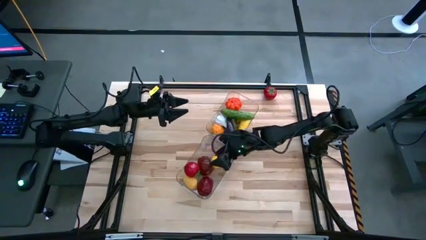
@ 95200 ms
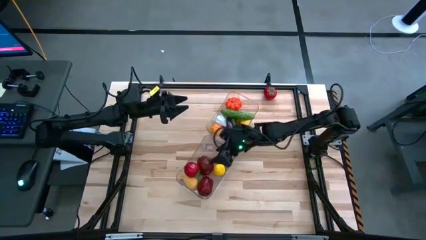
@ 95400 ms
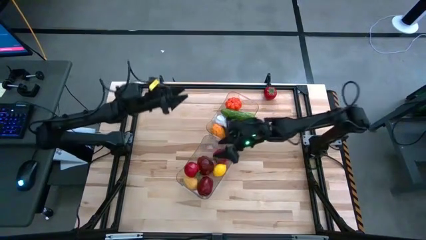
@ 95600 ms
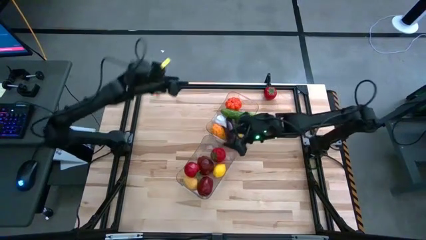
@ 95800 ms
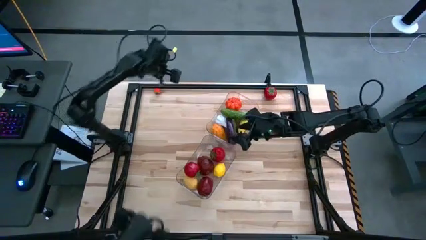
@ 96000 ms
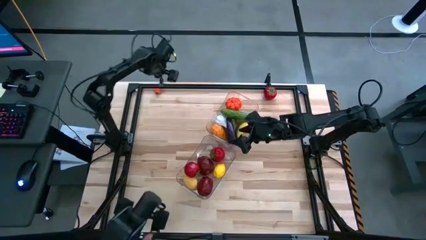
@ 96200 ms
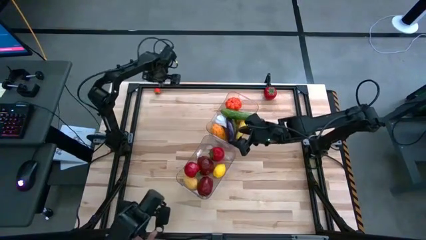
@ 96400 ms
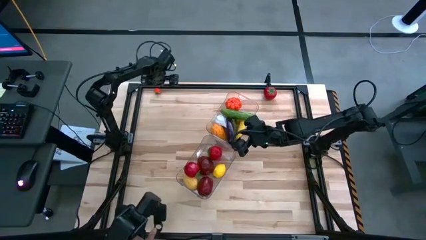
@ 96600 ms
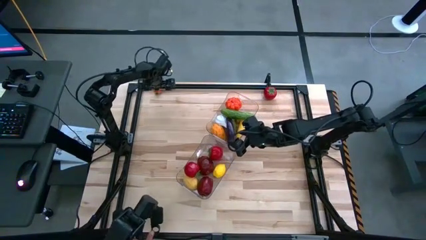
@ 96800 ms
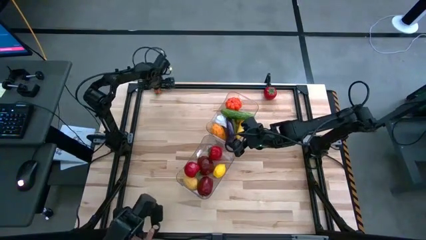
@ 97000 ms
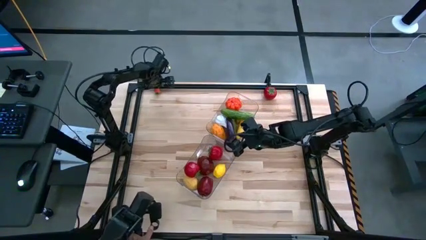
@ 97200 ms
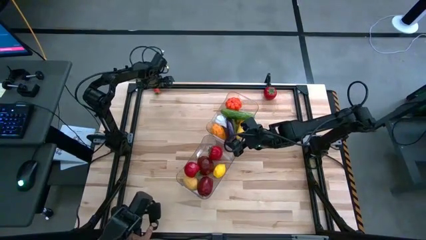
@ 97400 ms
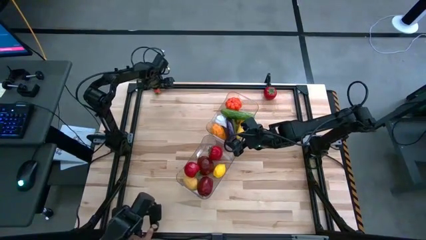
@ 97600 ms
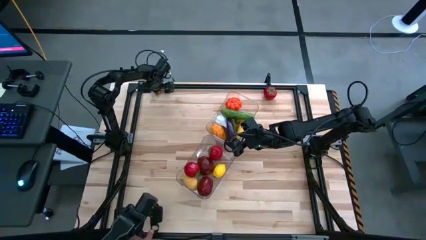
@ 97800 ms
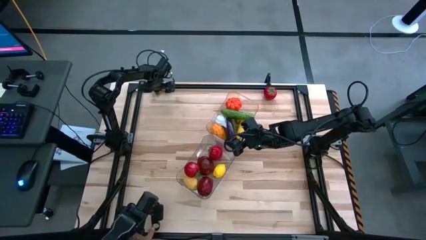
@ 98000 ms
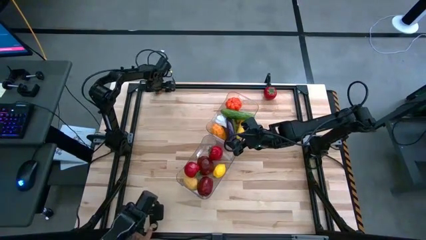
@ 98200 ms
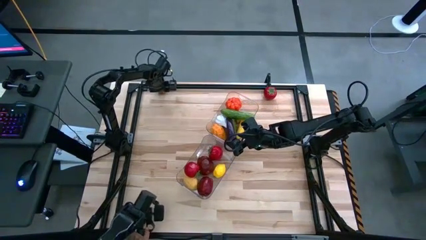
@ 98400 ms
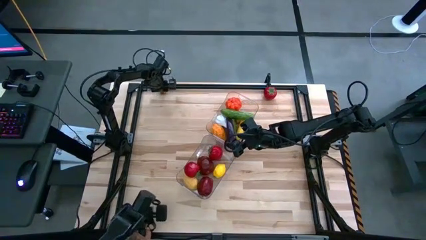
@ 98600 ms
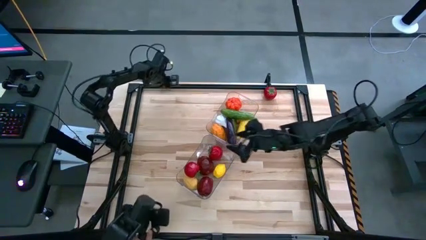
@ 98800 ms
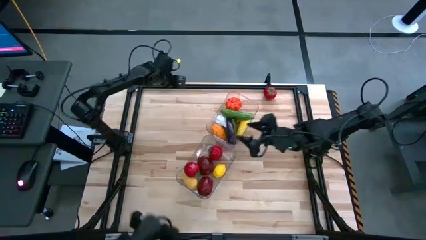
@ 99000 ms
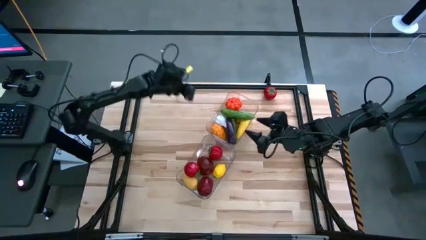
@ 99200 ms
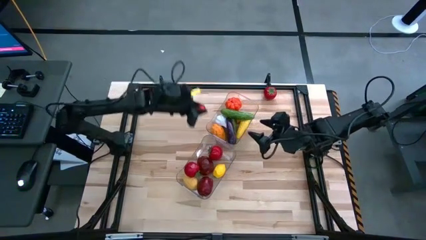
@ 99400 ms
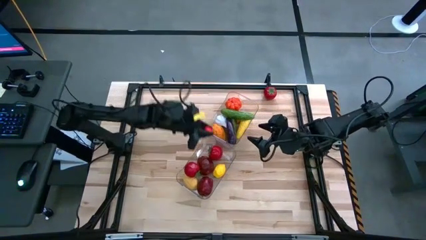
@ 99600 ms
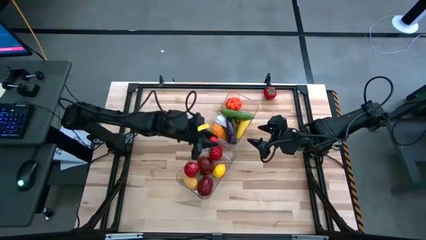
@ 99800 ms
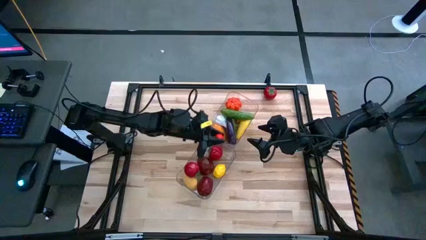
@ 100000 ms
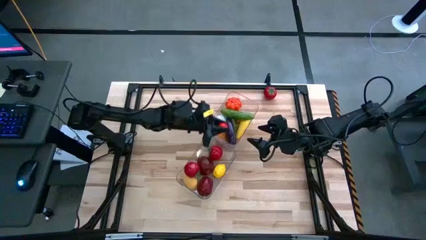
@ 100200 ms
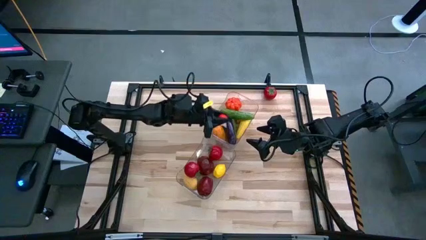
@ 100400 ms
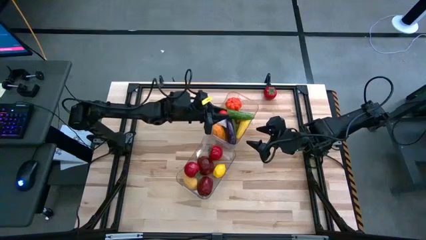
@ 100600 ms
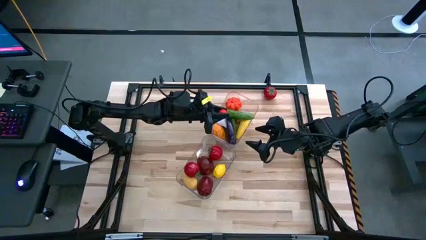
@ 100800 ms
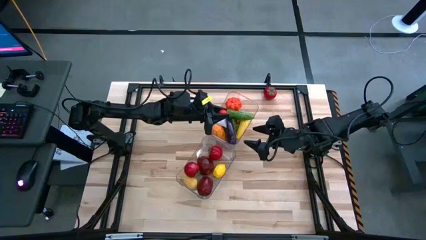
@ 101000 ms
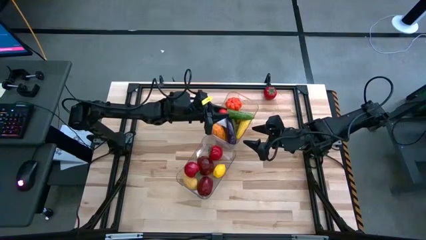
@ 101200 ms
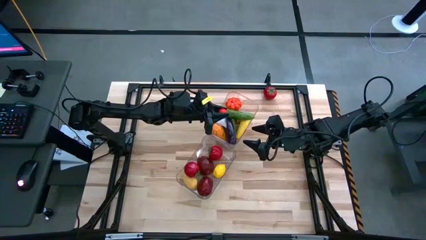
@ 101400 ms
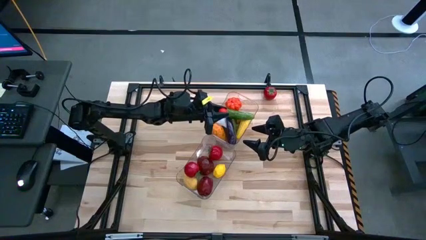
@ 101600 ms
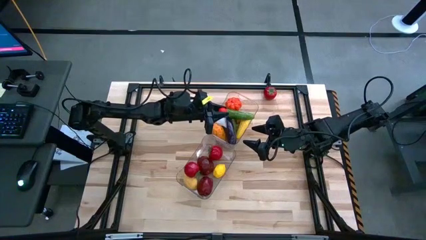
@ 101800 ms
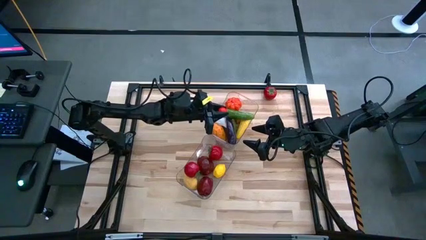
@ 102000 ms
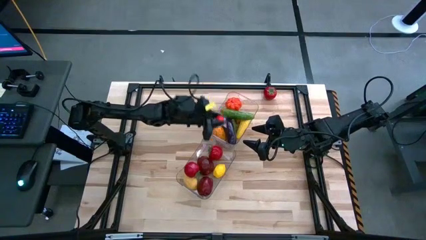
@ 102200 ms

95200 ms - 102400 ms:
Task: Sort produce into baskets
Put the orange tomato into the bottom transparent bin

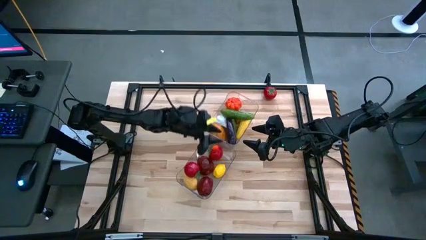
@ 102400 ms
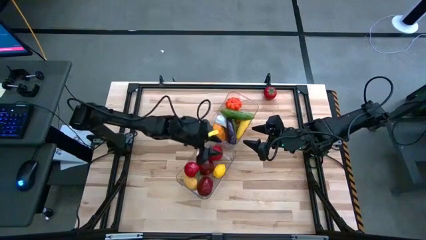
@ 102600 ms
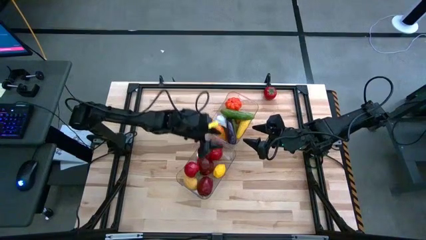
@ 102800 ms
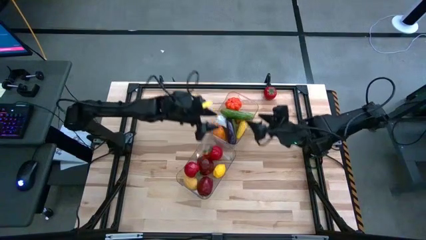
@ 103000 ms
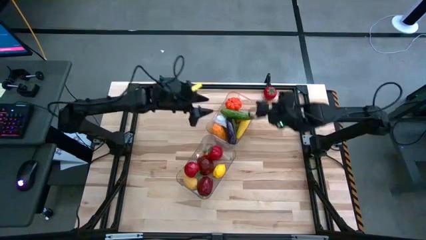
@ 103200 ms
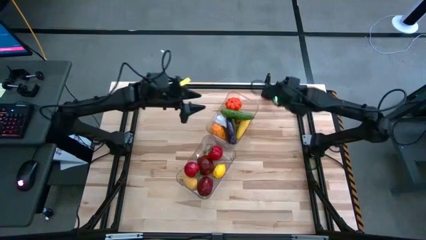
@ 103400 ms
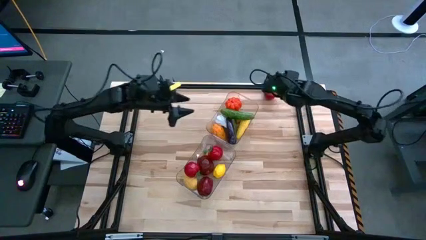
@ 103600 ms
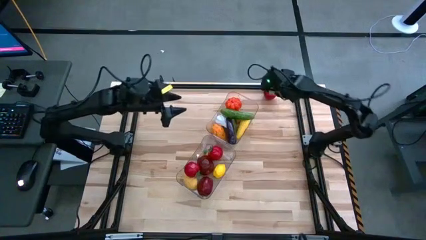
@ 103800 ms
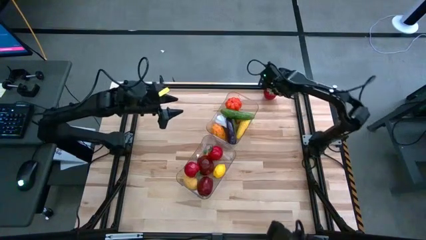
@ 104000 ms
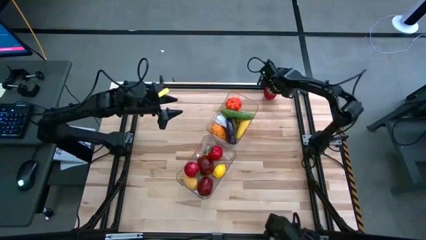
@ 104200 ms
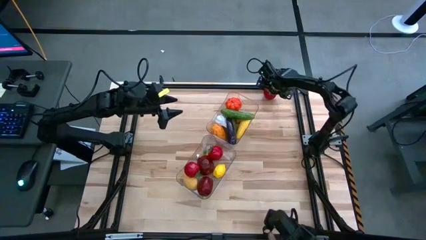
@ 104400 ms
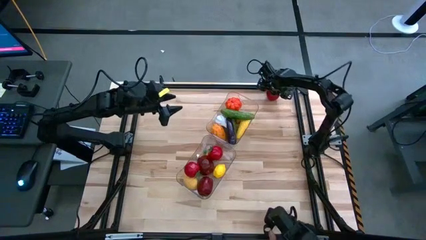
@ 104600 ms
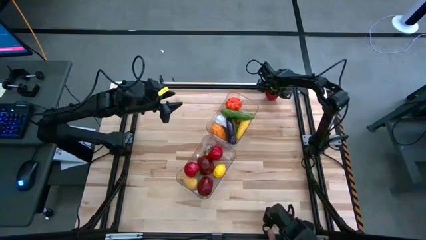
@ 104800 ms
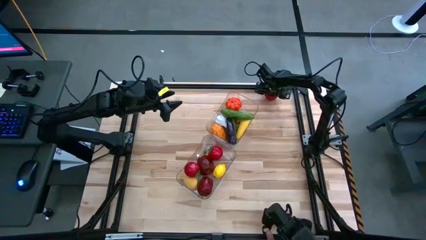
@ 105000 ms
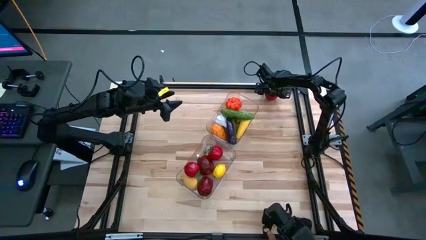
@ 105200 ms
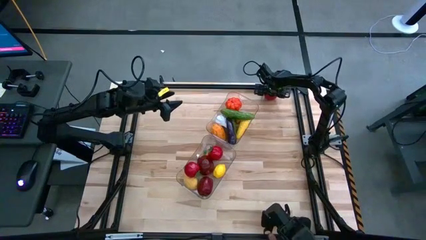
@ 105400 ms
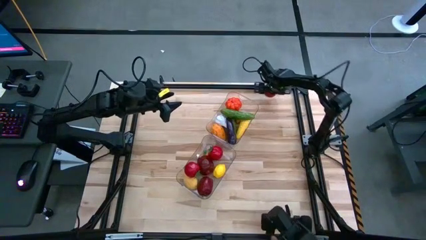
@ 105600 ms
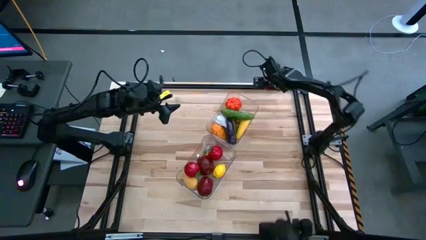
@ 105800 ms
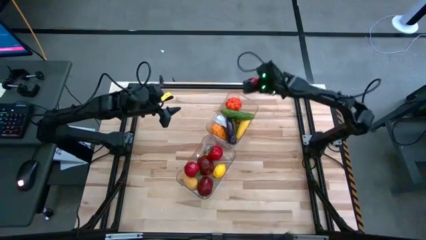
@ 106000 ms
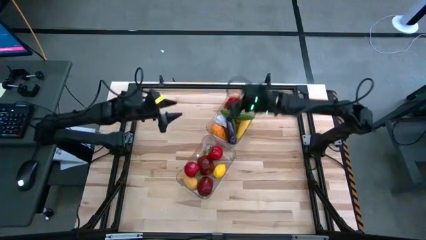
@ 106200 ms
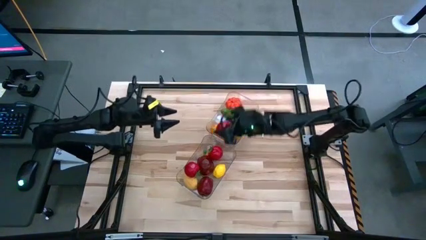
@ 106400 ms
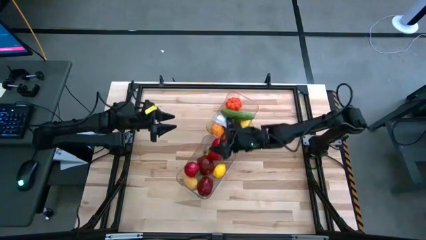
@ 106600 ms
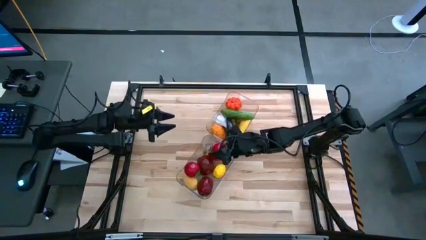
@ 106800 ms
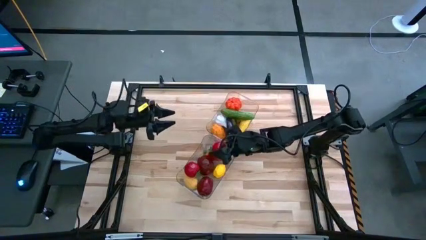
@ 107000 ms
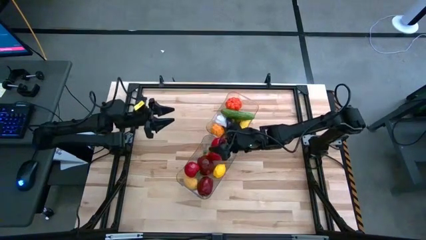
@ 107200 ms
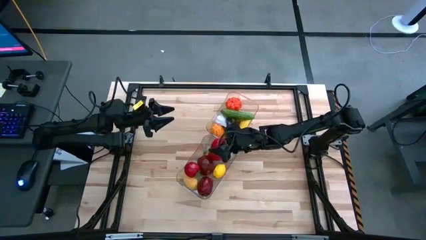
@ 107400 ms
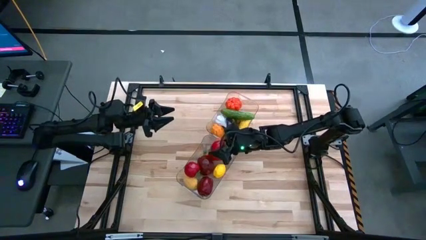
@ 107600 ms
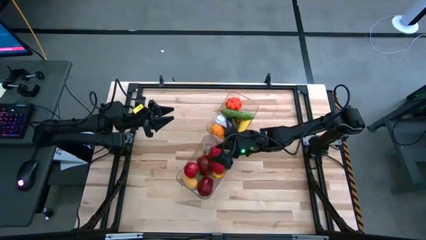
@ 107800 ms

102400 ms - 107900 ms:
Put the red tomato into the bottom transparent bin
